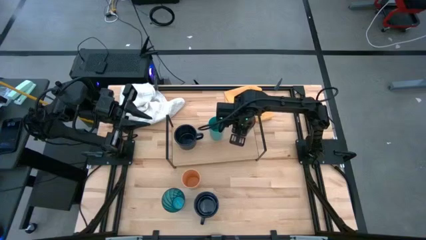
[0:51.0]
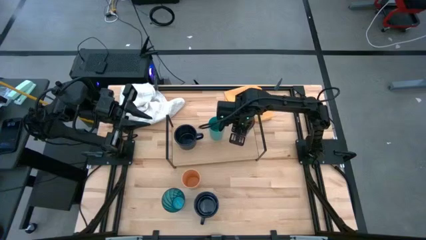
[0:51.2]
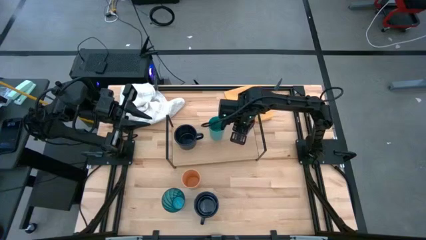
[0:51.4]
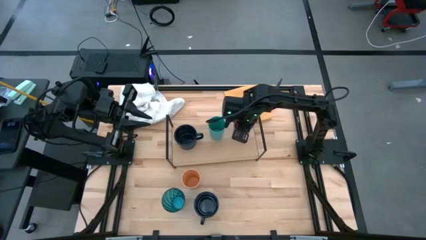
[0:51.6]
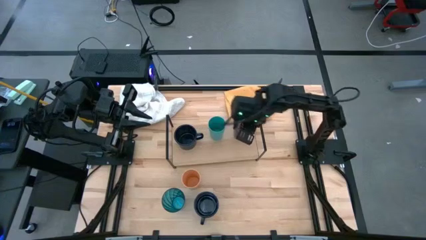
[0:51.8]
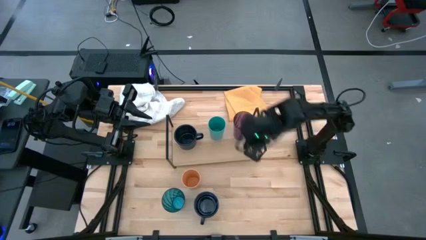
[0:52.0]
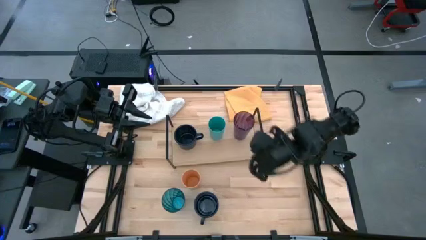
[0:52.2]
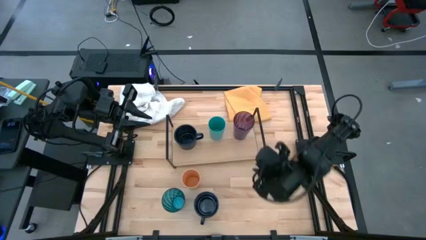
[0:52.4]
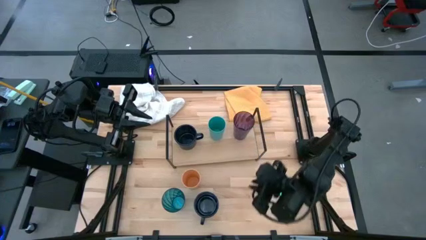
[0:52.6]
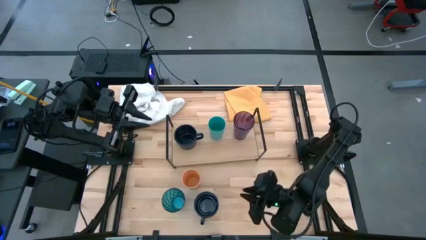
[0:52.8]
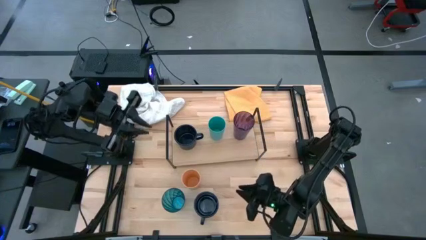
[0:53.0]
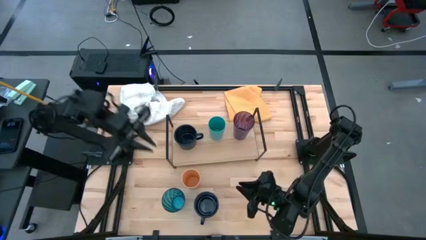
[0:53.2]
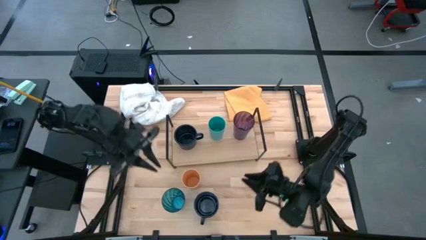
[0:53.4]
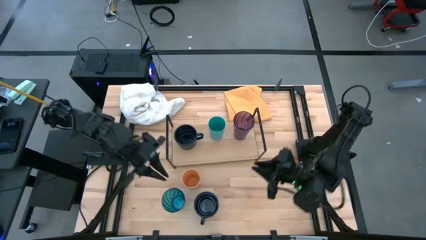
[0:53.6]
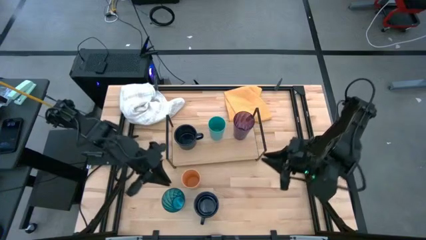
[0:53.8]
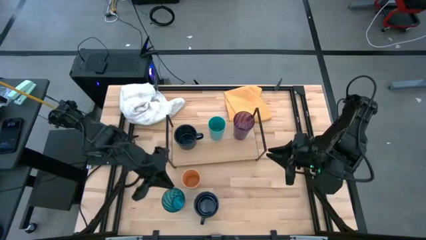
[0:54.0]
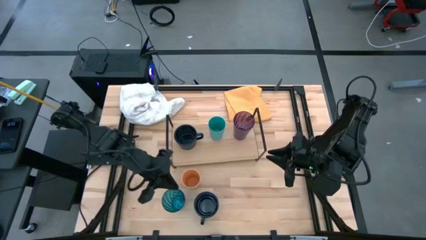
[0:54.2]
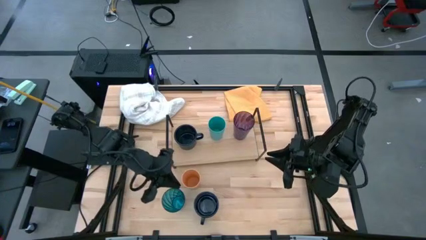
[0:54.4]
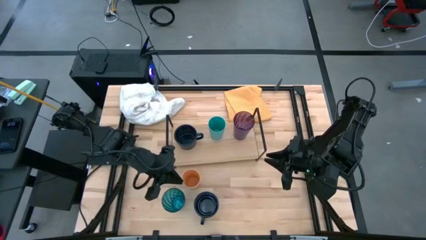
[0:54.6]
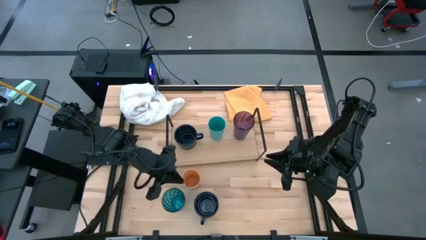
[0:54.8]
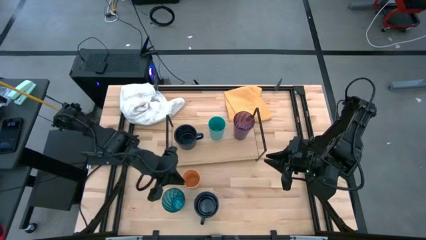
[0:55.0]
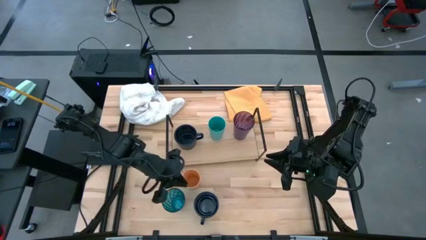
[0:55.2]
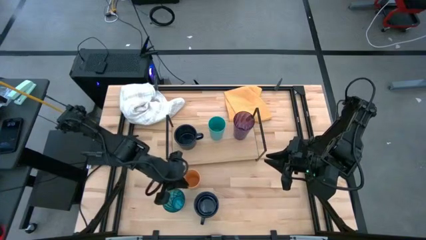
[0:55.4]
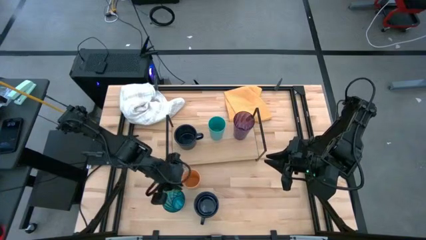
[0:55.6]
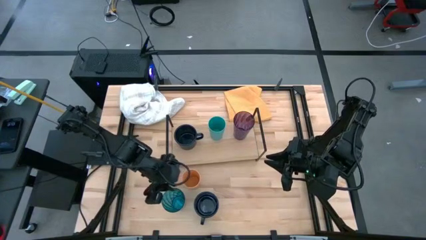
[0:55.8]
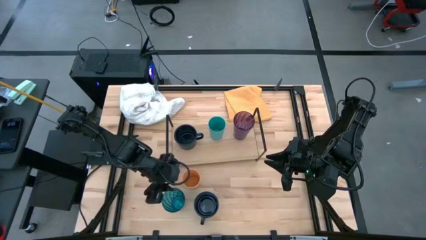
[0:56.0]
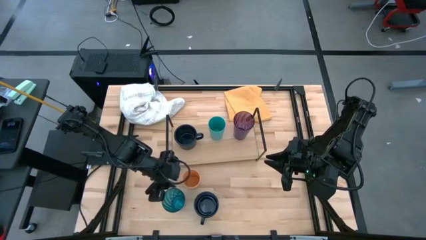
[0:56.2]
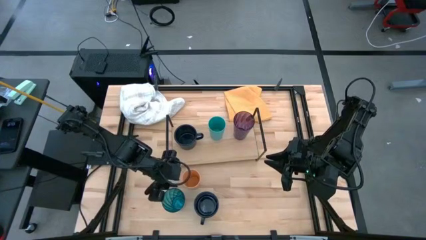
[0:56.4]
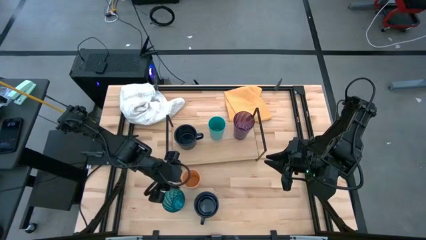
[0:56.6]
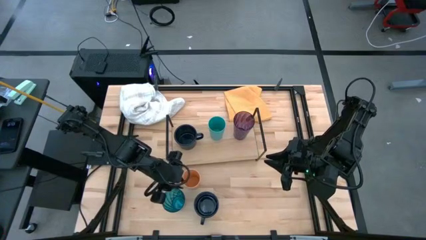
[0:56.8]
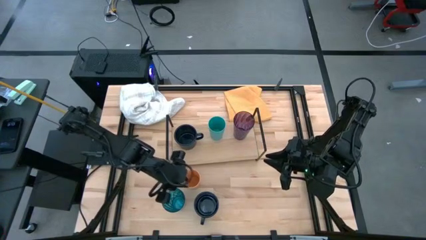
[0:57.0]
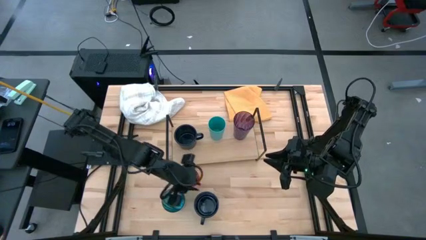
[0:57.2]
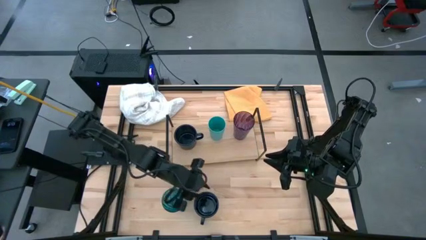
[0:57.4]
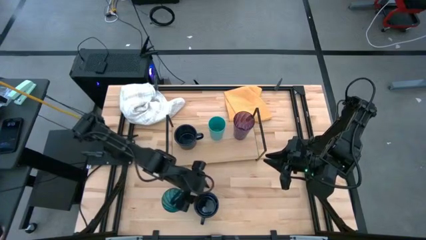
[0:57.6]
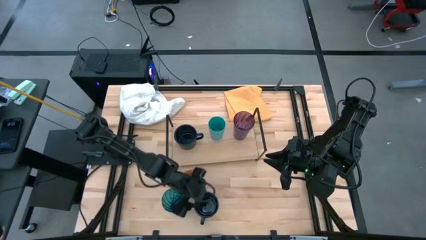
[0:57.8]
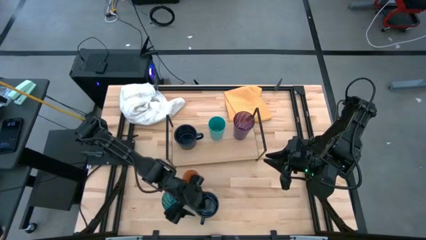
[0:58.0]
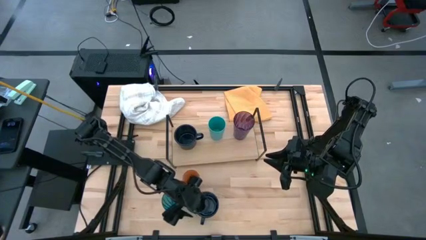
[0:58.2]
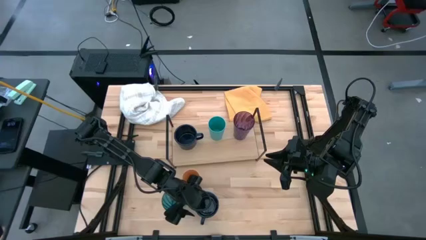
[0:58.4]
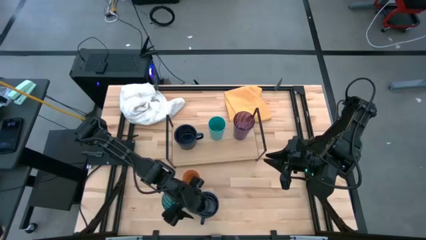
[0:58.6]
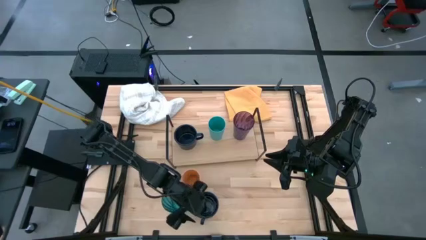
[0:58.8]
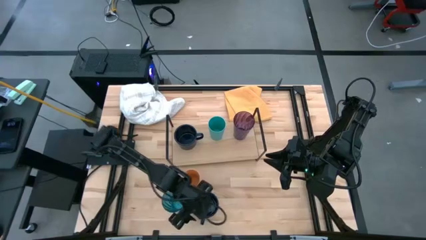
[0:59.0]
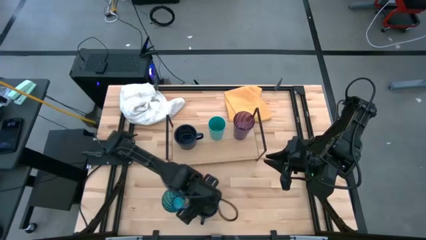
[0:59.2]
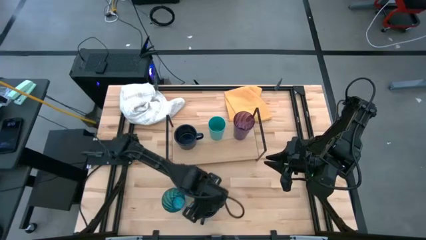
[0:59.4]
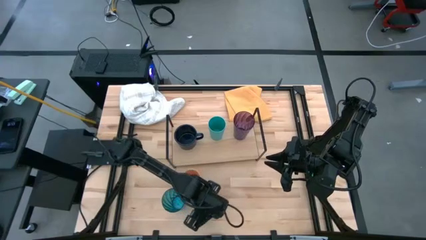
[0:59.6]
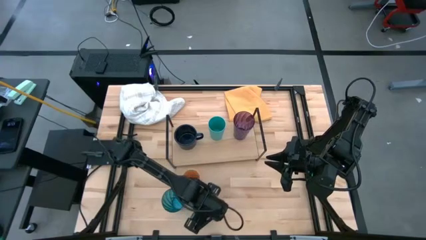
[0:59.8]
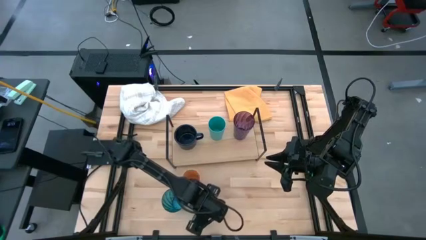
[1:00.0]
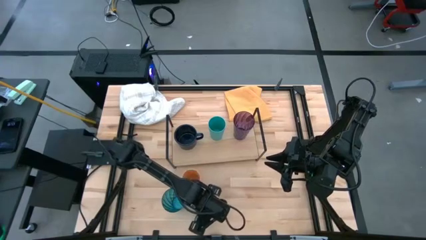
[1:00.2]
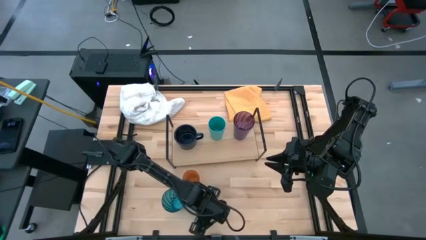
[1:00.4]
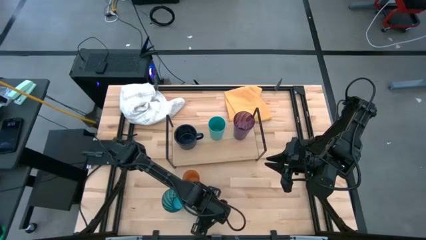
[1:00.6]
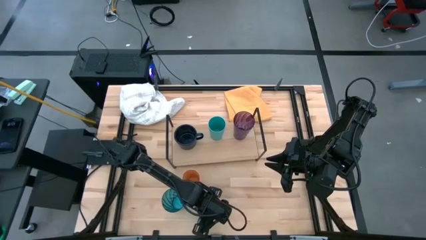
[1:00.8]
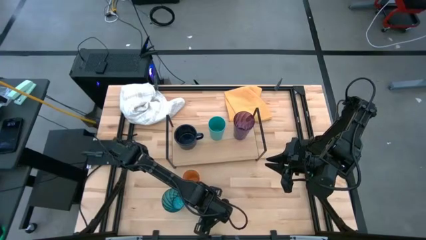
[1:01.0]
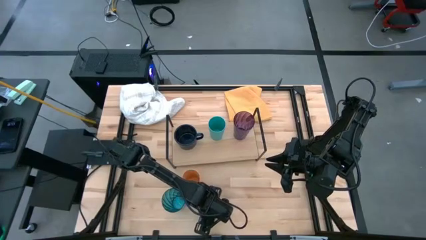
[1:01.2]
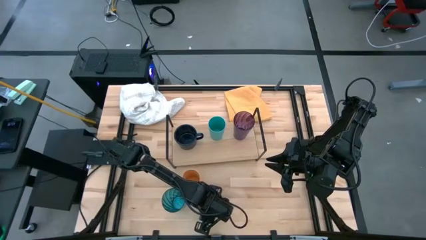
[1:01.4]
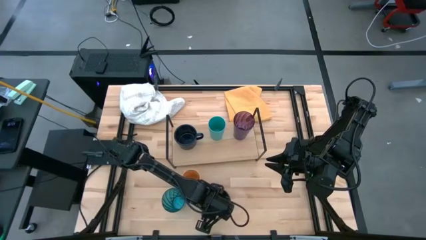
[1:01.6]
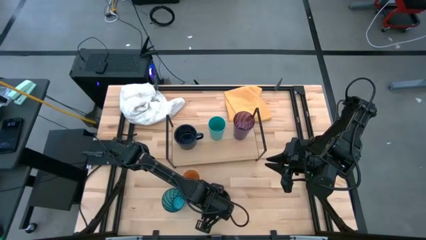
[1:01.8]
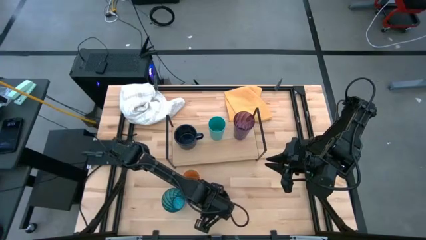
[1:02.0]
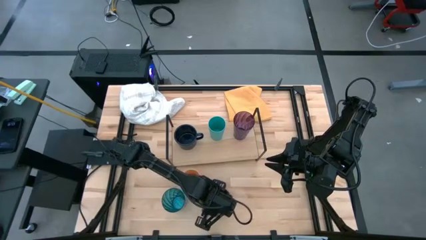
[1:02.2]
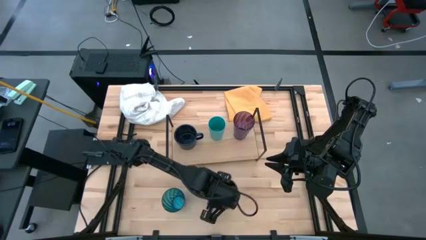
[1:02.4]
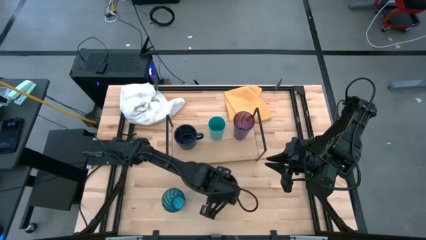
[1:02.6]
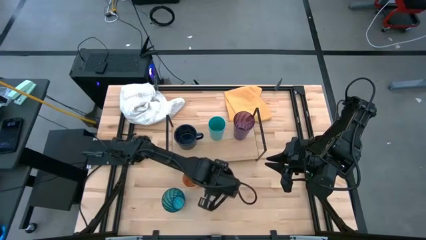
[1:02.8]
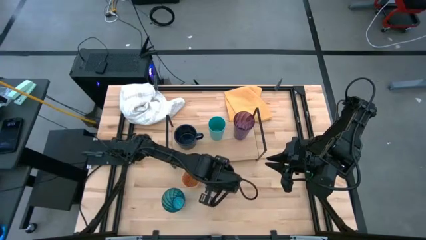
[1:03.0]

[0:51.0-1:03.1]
Task: Stack small to large cups/mugs on shelf
Put the dark blue mug on the shelf aligned with the other dark blue mug
